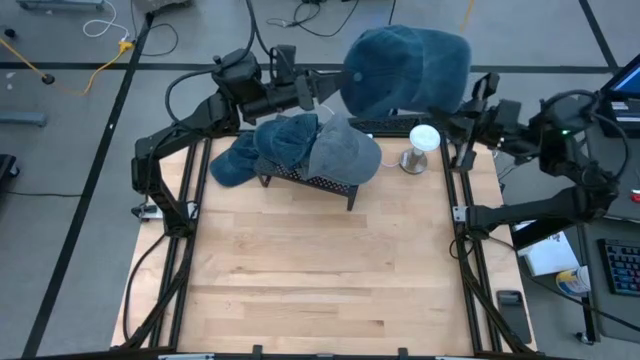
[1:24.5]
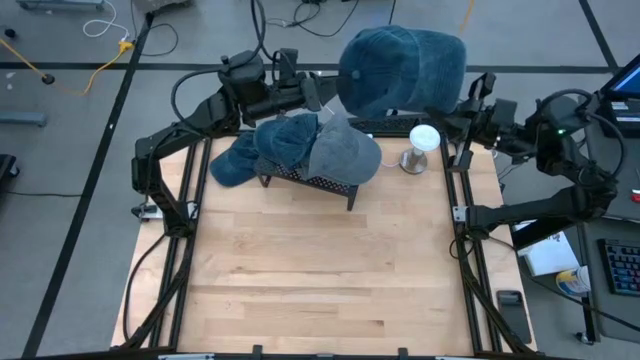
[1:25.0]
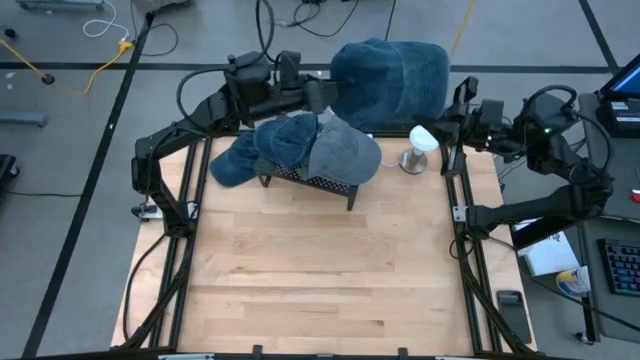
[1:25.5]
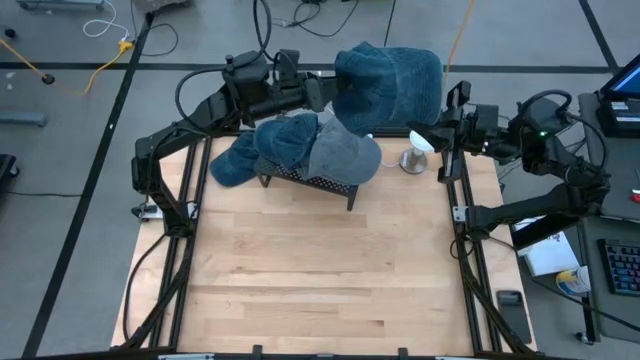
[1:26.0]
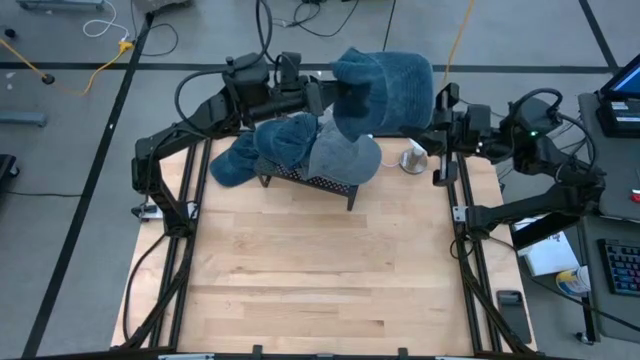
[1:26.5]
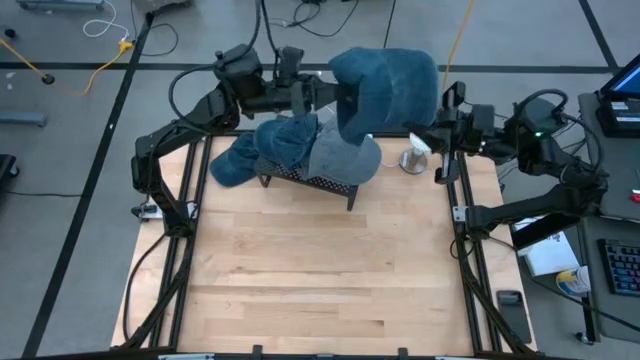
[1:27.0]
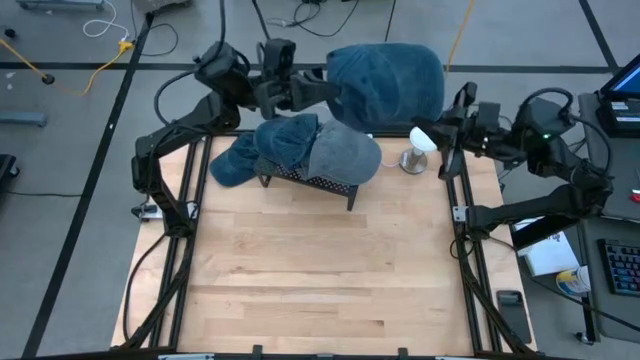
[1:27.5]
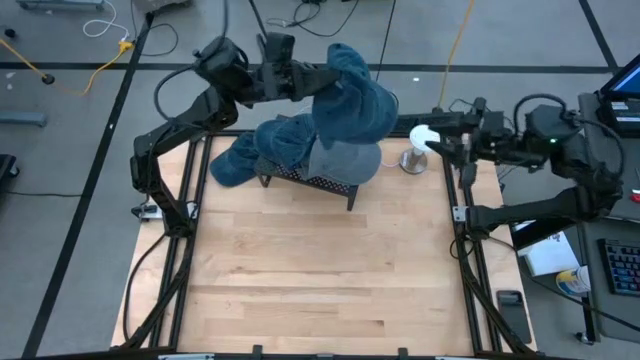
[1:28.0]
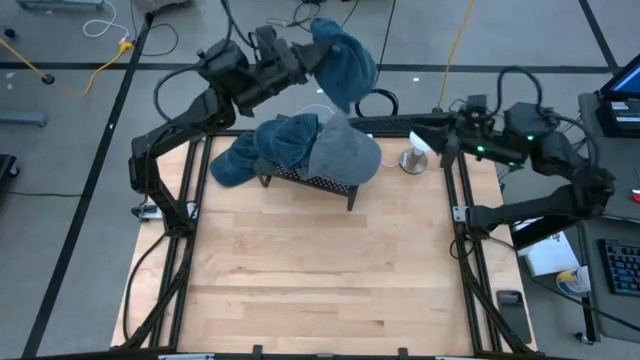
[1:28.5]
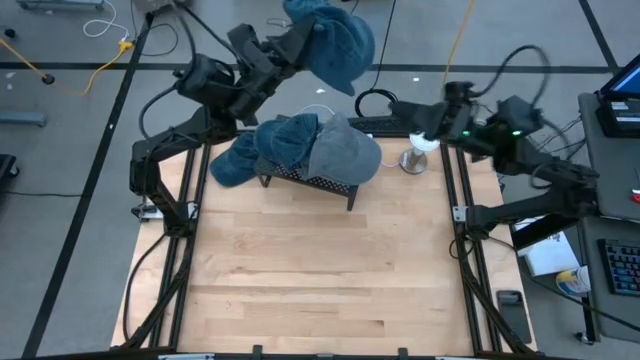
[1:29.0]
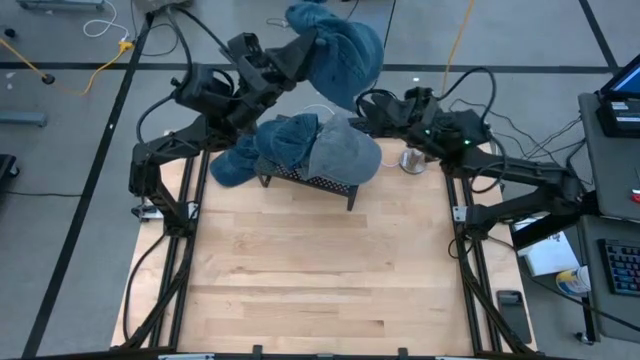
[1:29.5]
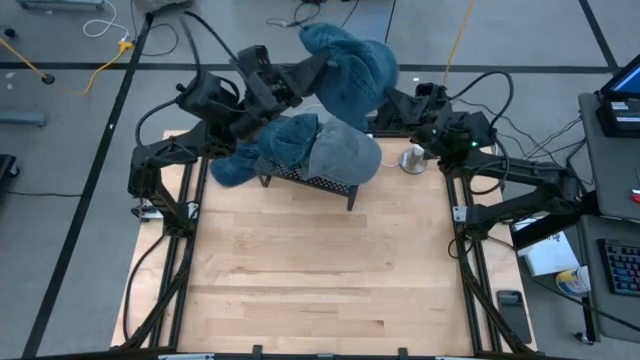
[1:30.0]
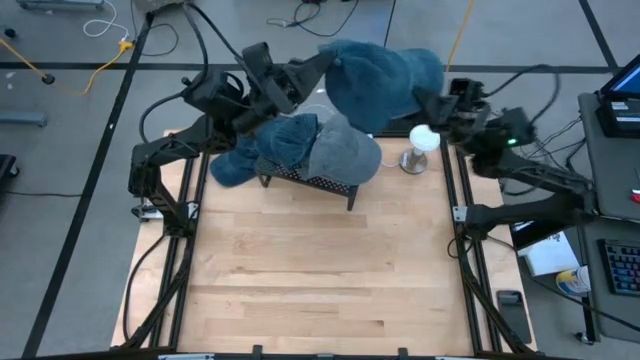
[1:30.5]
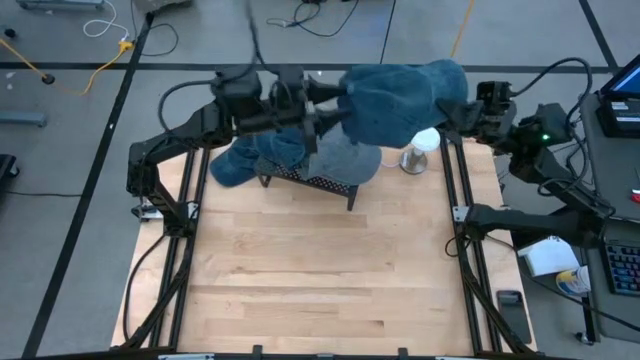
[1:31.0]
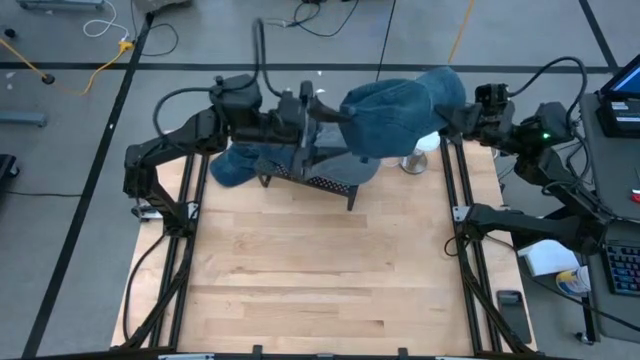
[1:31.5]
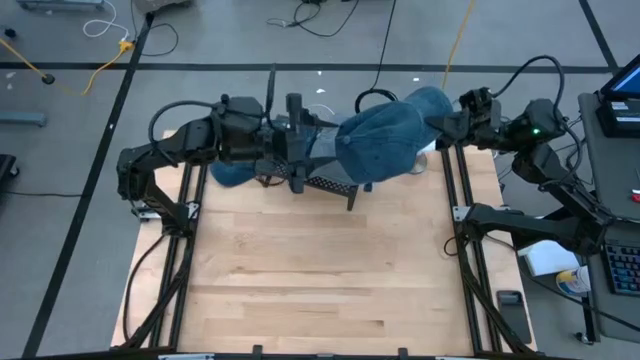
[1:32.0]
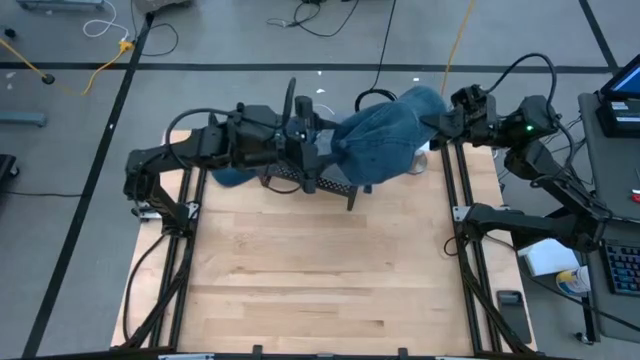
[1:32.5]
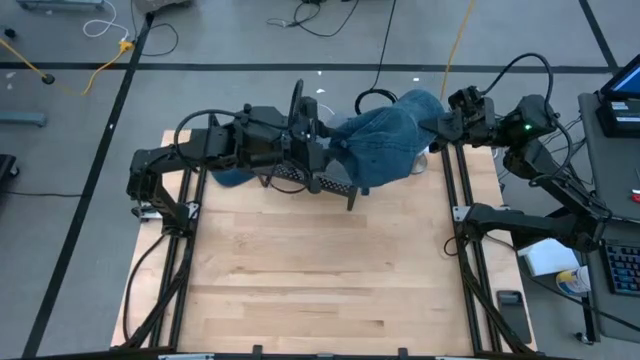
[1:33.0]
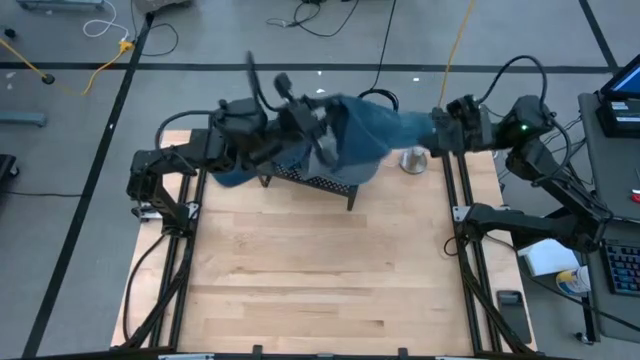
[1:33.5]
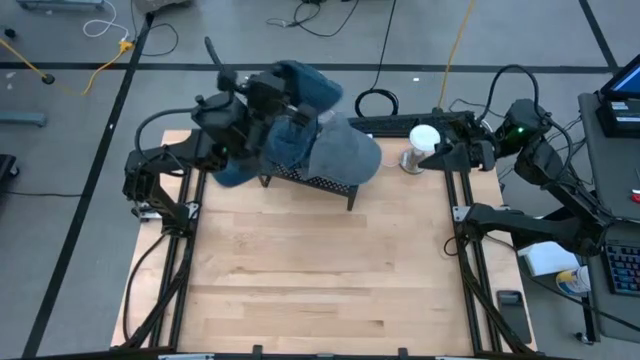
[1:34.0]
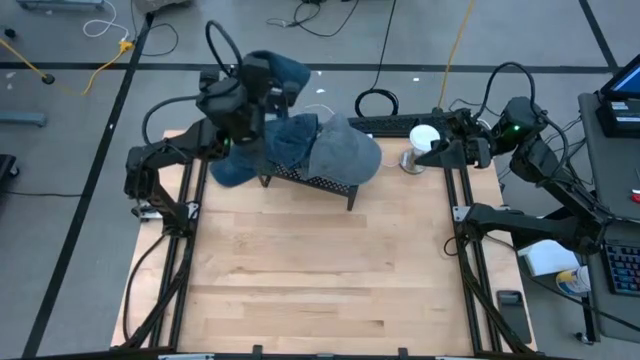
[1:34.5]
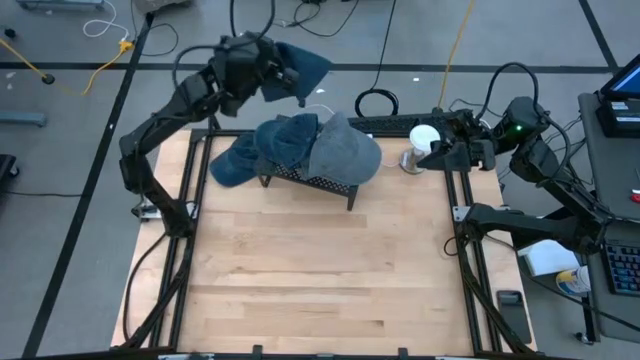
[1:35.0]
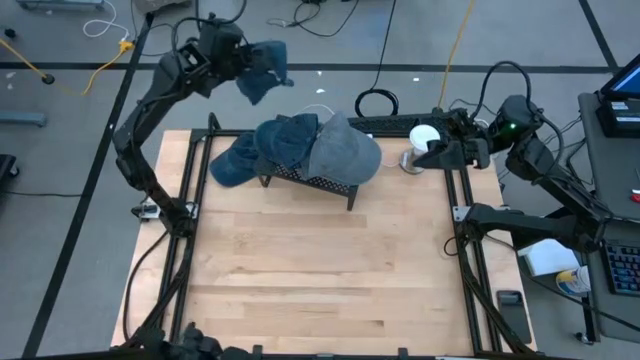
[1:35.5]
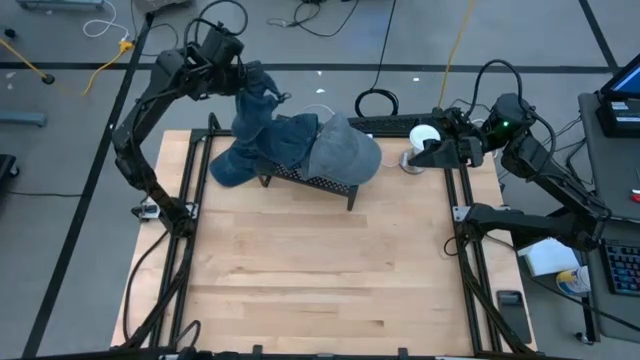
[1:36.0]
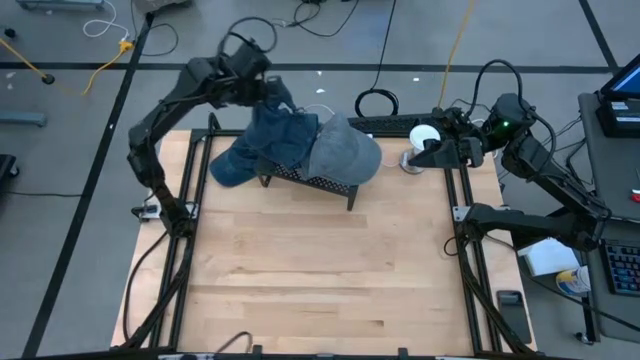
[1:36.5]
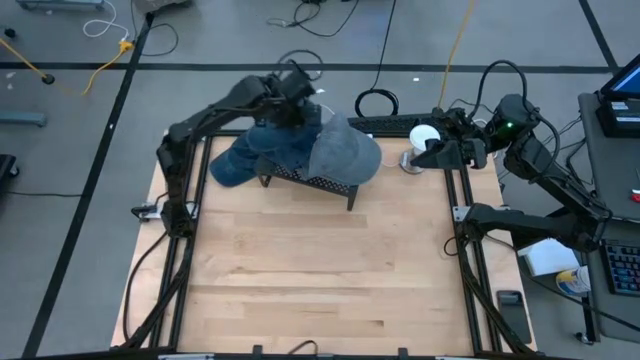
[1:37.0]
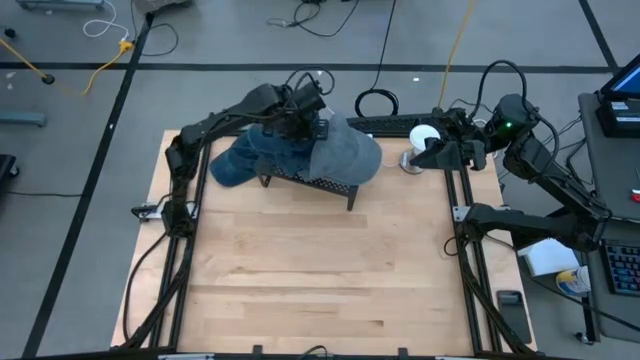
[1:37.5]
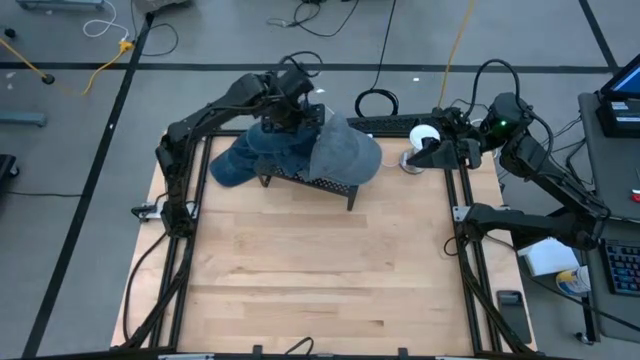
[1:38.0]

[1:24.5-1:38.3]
Task: Pick & Place hat
Stack the blue cap on the blue cap on the shelf

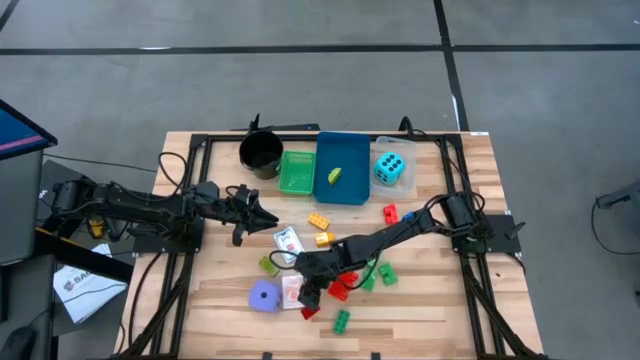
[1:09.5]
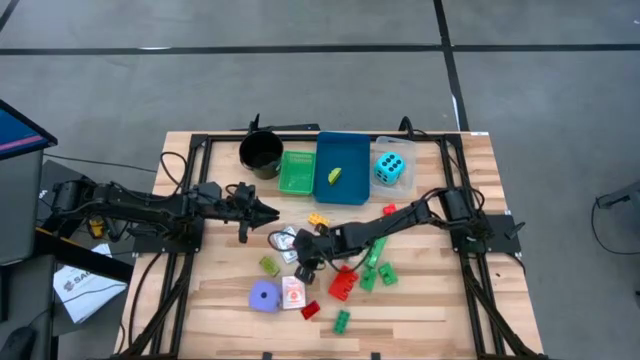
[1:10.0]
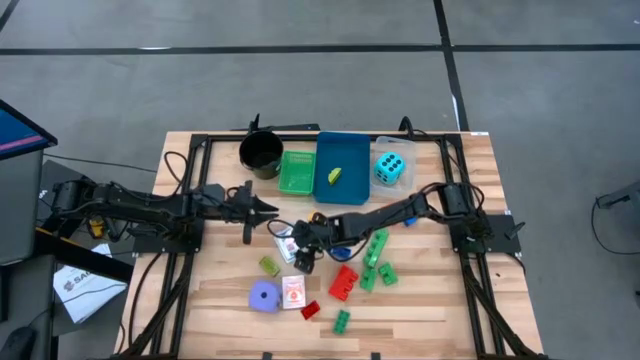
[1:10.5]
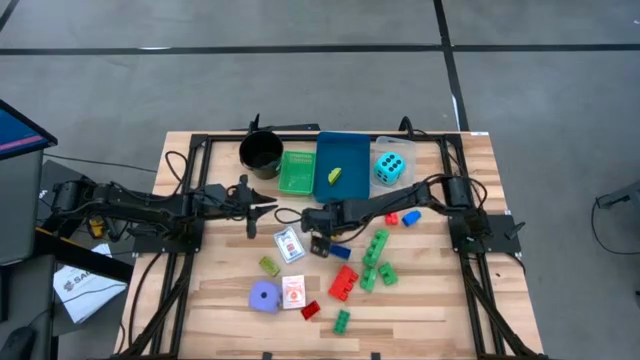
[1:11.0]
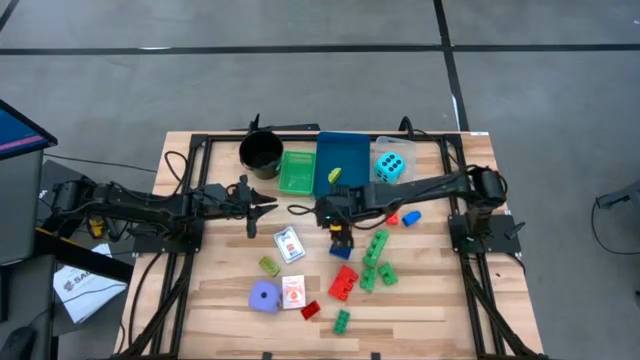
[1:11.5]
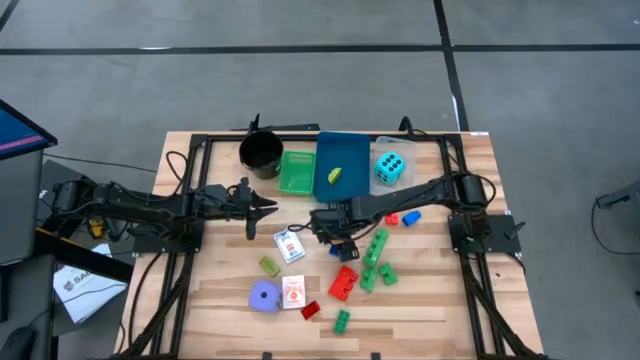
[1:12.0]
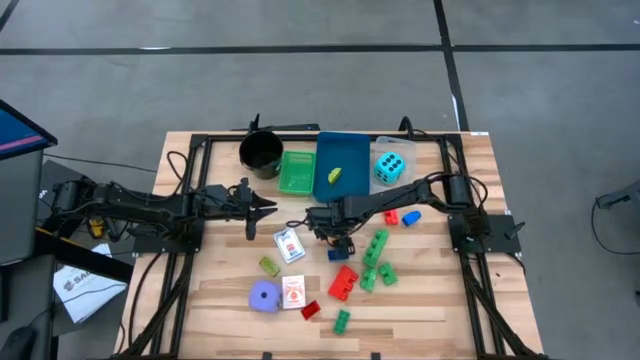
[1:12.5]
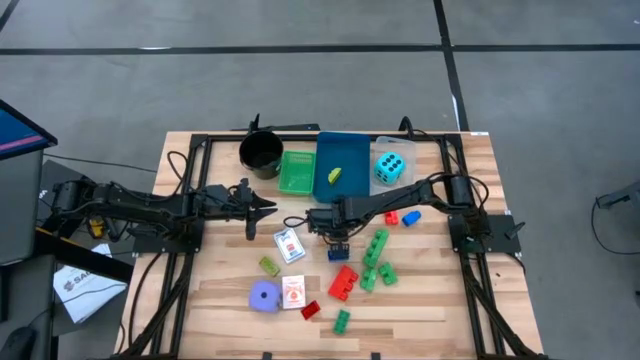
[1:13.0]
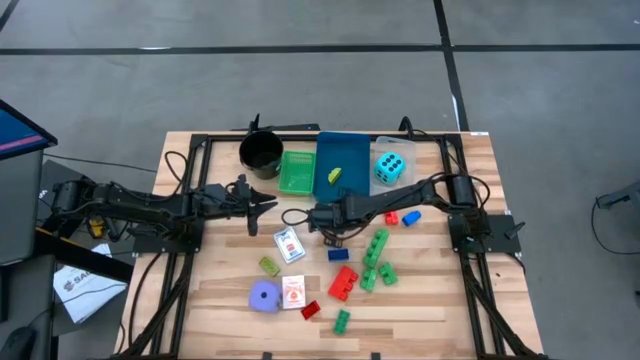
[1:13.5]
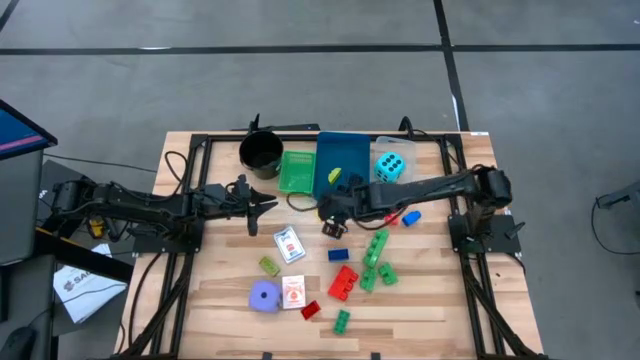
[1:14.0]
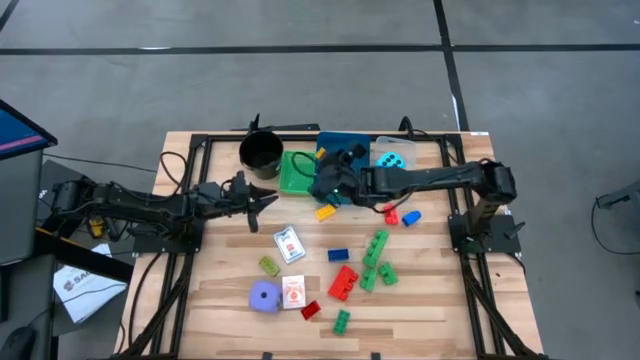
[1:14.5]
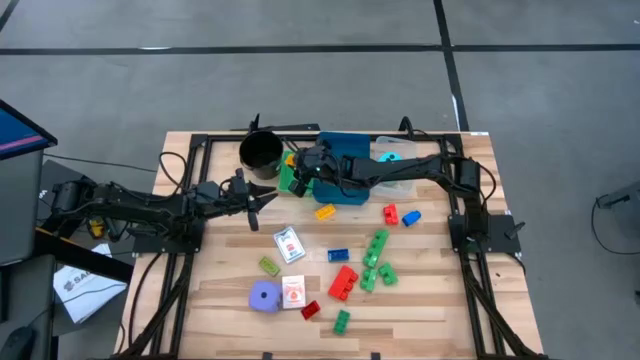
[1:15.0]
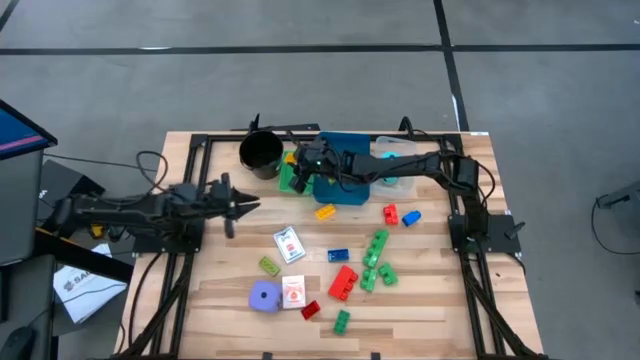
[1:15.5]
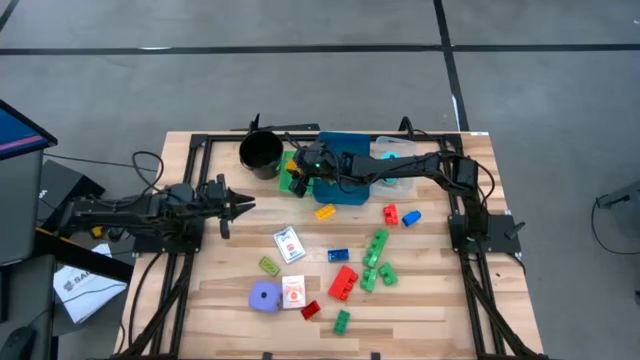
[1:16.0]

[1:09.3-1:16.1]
Task: Pick & Place Toys
Put the large stud yellow game piece into the green bin
